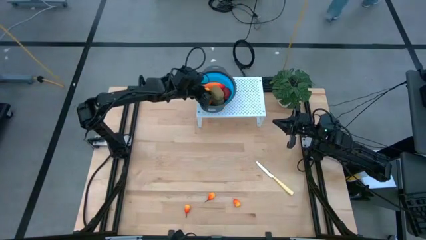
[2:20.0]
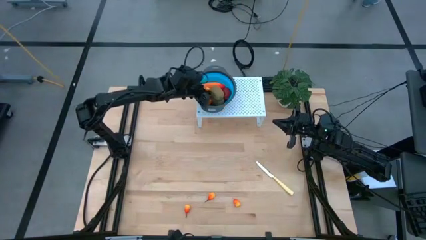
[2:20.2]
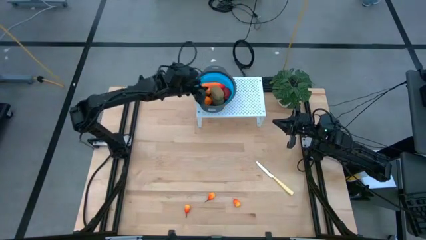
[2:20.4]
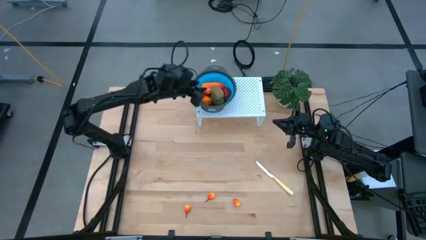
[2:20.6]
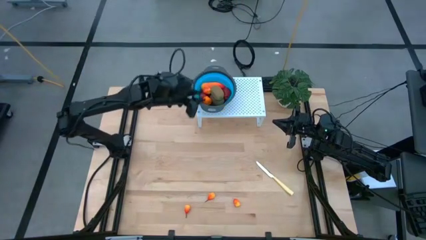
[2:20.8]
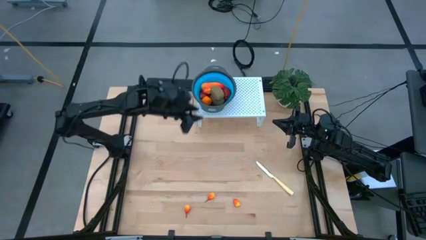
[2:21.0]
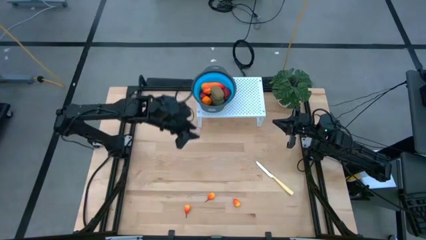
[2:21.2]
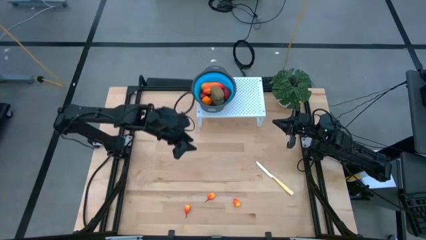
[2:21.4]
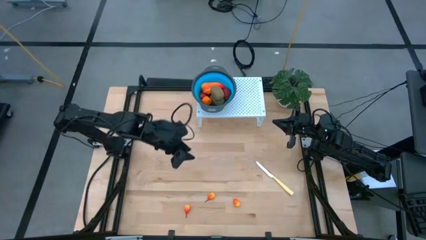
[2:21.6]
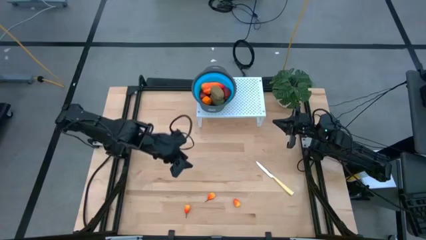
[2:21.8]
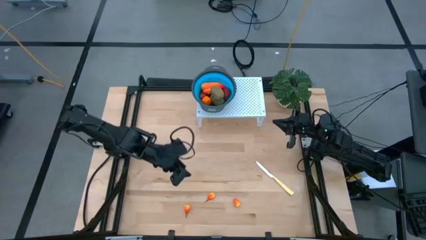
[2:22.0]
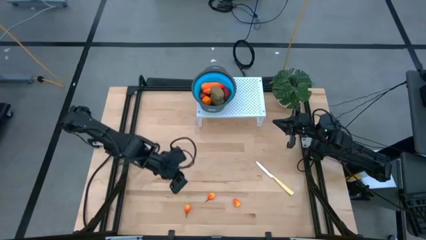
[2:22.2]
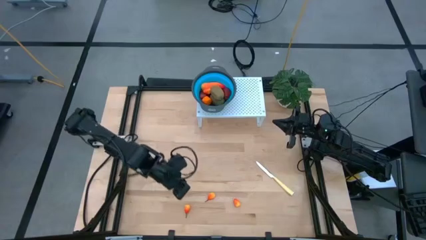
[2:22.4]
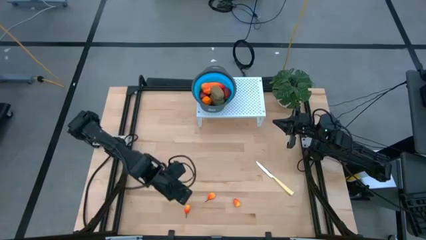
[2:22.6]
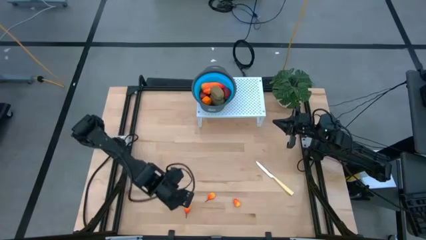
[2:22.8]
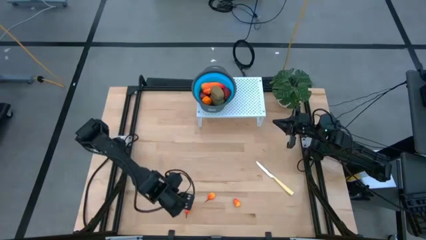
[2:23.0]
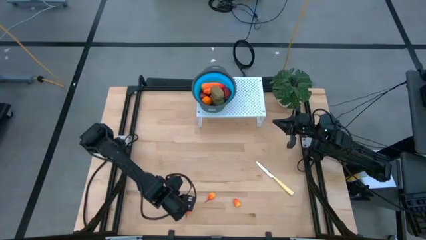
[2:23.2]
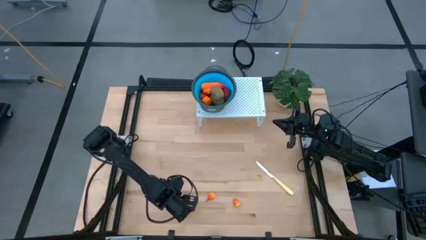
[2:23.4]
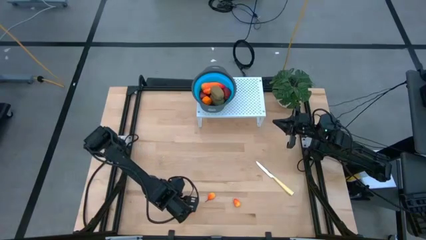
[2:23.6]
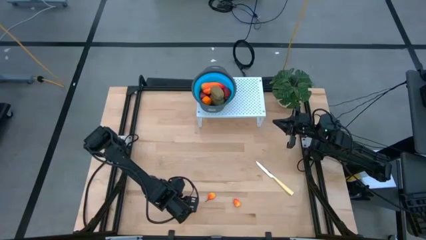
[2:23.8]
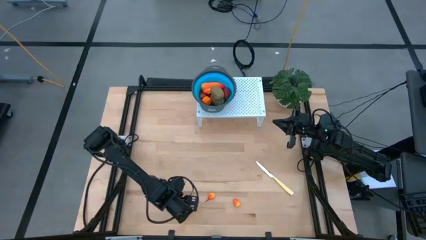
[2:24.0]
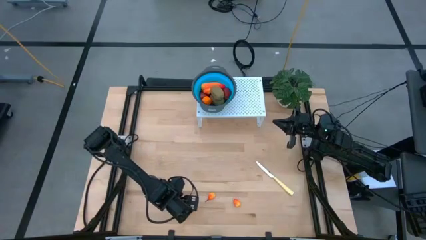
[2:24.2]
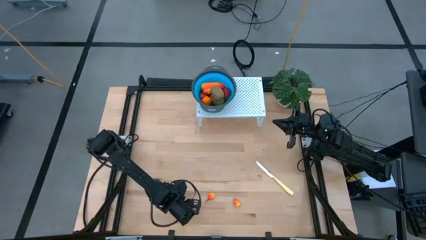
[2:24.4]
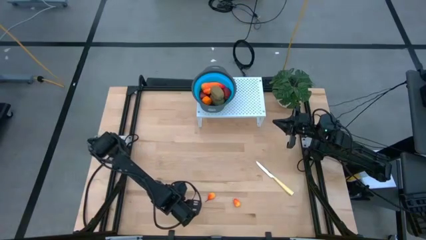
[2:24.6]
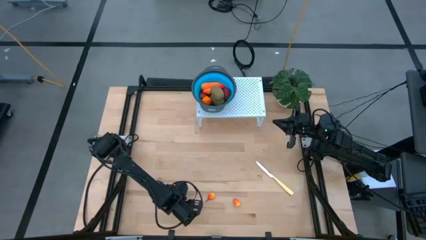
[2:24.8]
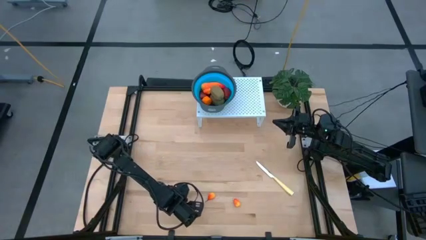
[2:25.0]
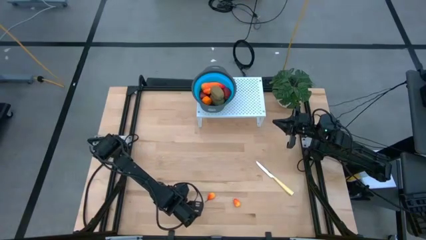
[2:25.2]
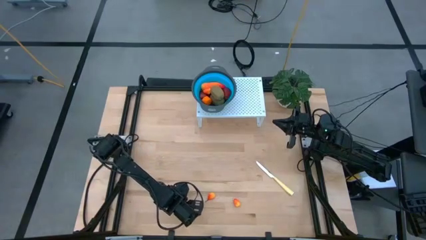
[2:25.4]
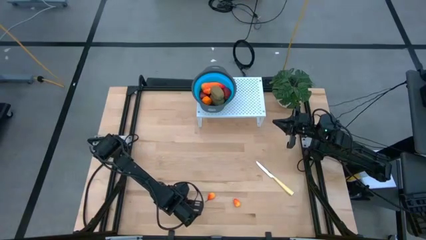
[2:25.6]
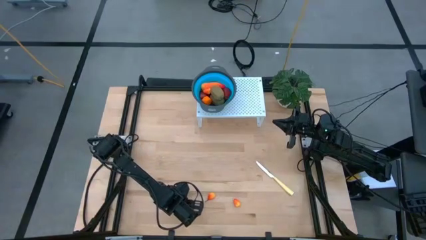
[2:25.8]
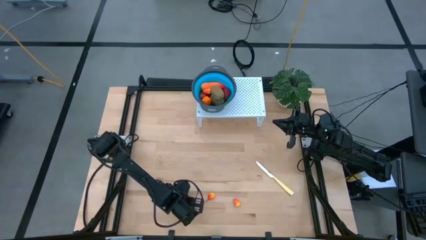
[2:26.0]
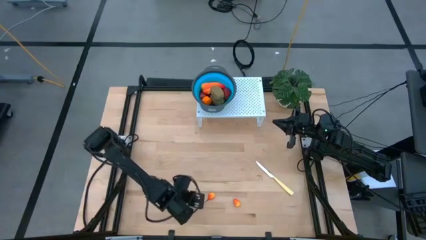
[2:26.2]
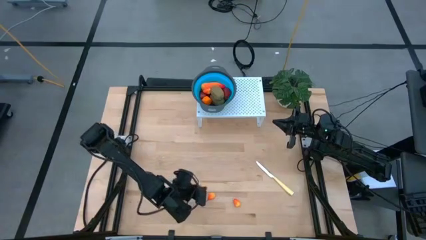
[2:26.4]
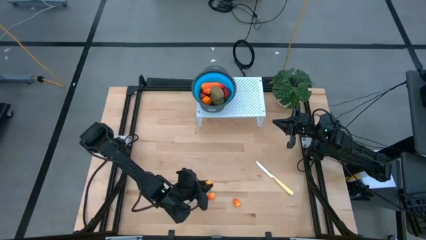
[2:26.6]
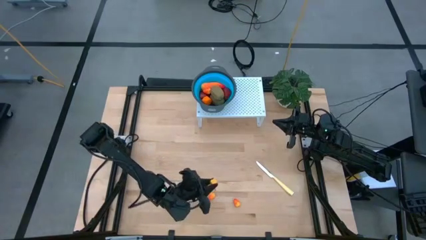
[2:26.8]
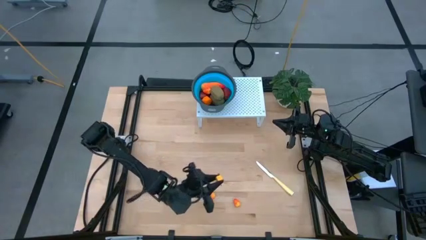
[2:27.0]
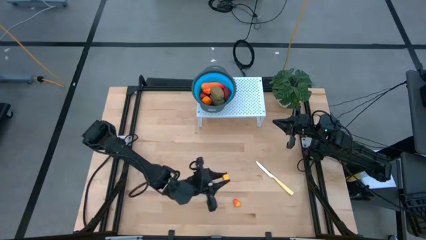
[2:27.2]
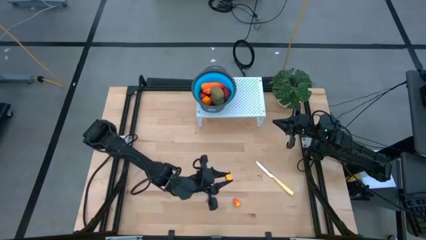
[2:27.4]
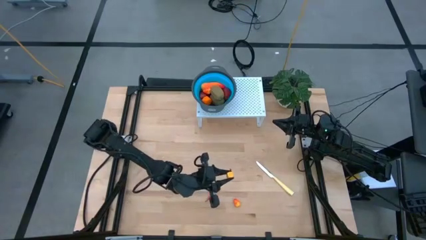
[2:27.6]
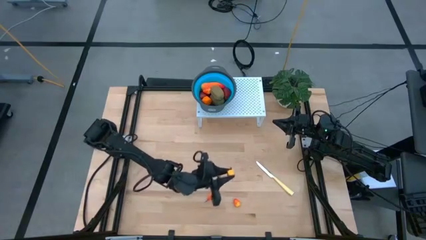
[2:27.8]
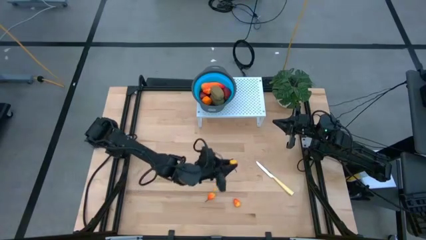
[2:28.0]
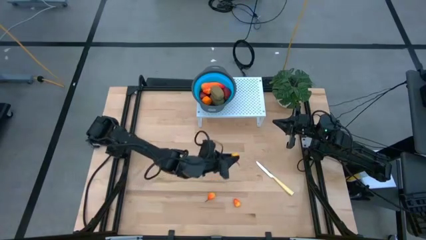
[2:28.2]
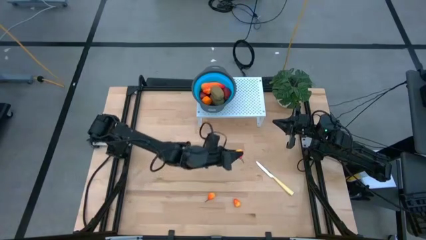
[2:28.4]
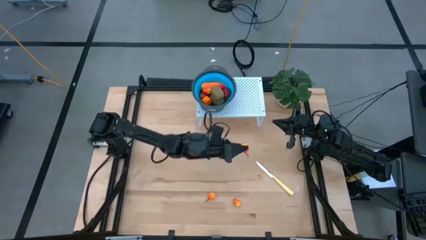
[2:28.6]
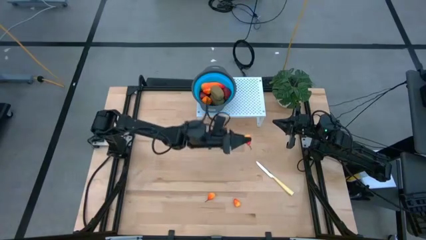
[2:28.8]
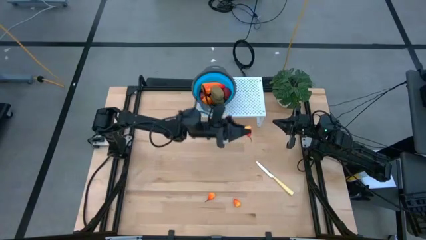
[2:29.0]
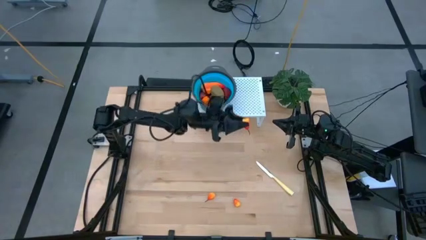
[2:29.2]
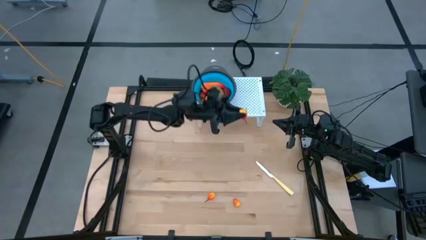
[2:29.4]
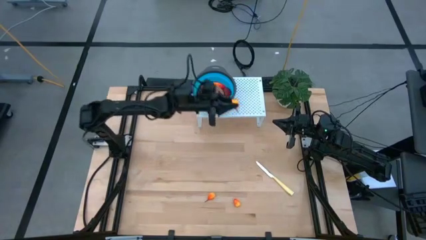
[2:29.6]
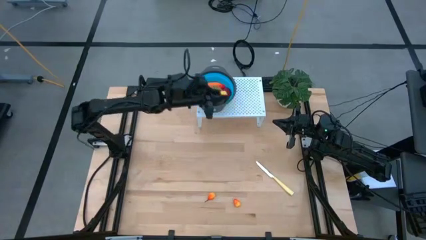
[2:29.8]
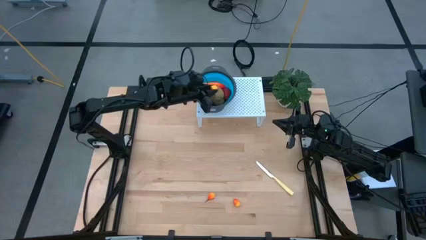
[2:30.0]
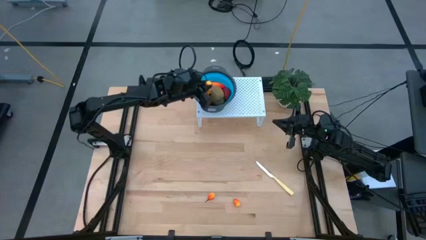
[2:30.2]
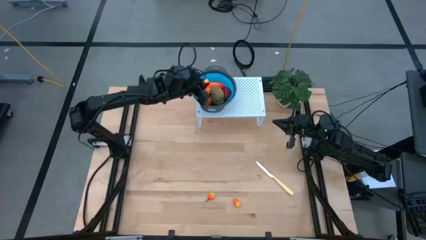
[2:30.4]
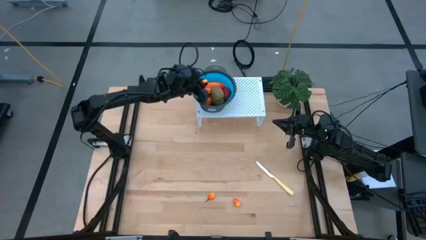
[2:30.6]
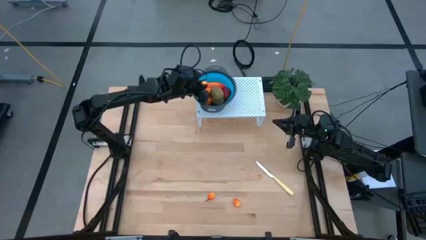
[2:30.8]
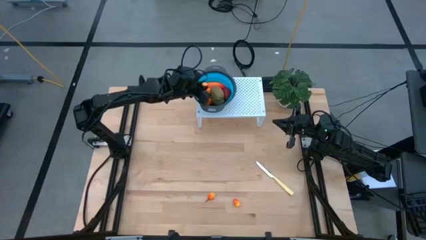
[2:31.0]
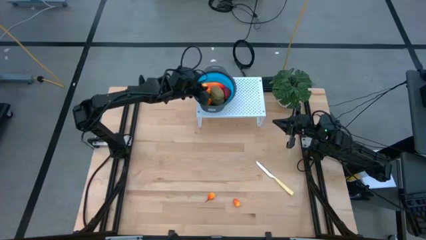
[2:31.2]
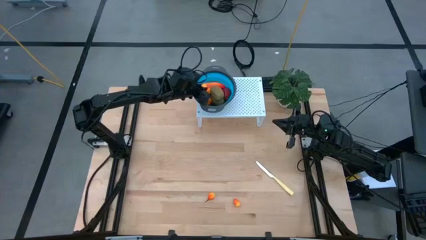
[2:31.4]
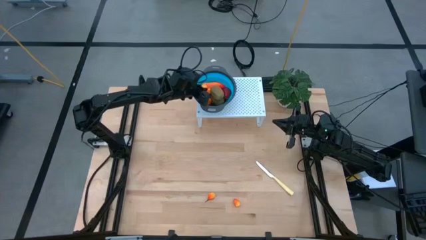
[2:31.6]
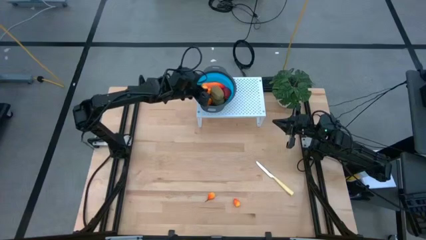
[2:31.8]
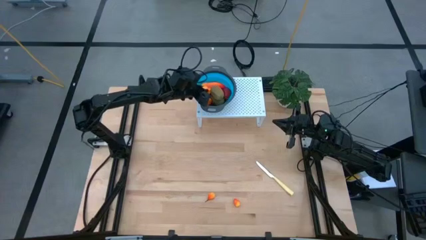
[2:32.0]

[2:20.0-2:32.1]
Task: Pick & Place Fruit
Put the peach into the blue strainer bowl on the shelf

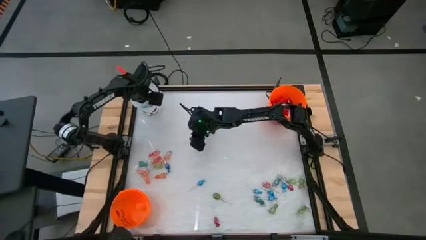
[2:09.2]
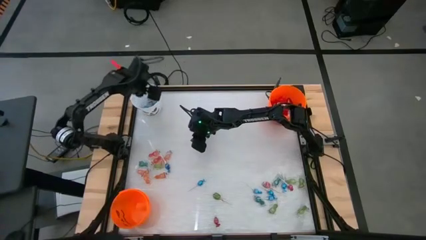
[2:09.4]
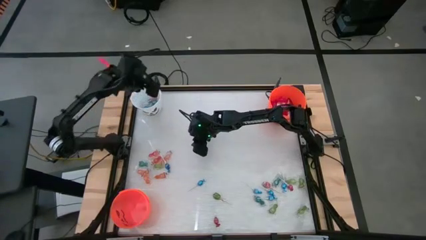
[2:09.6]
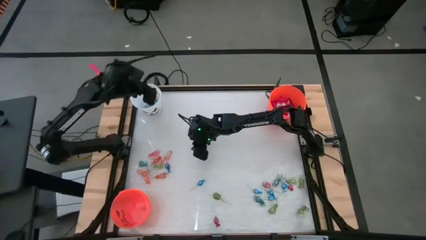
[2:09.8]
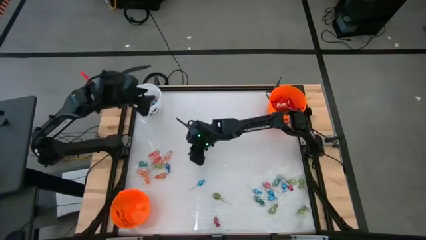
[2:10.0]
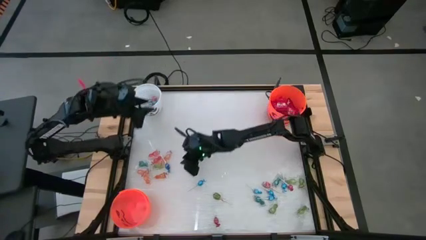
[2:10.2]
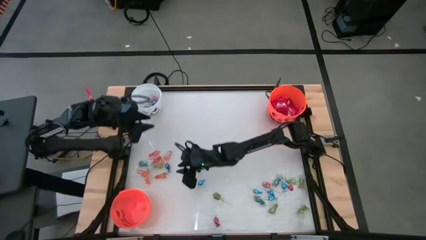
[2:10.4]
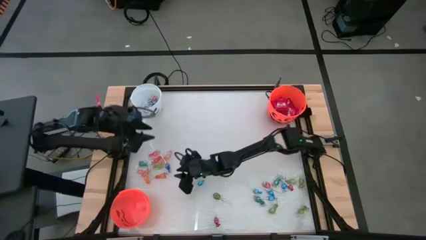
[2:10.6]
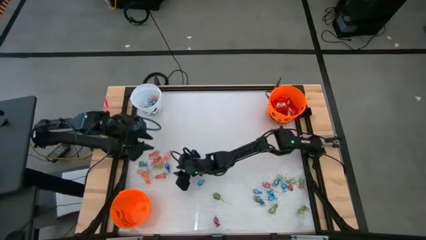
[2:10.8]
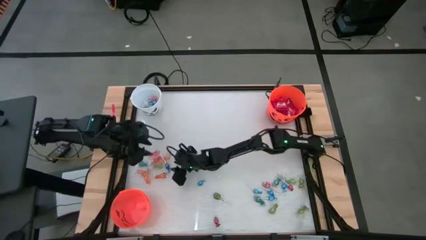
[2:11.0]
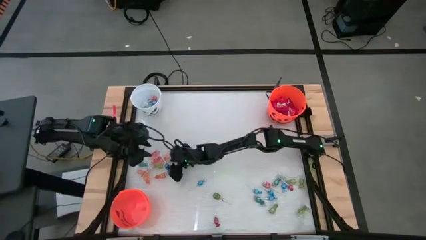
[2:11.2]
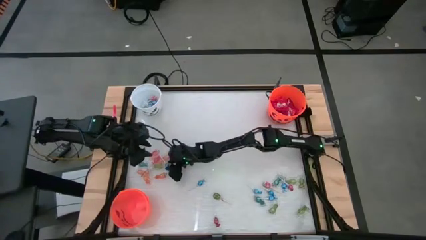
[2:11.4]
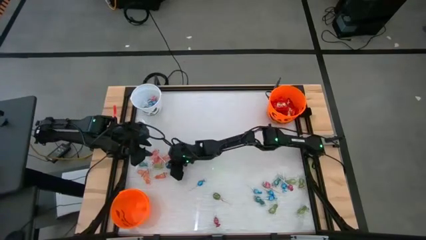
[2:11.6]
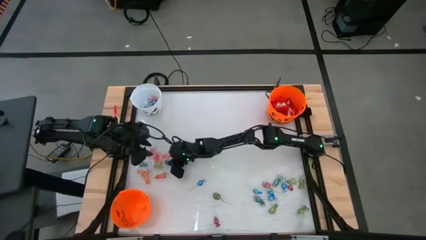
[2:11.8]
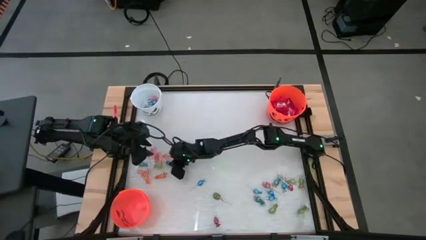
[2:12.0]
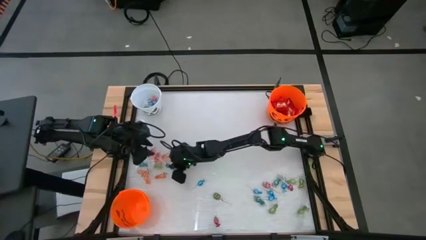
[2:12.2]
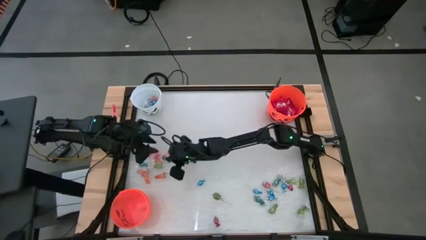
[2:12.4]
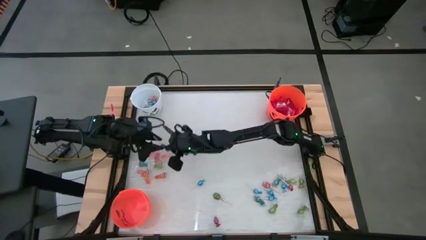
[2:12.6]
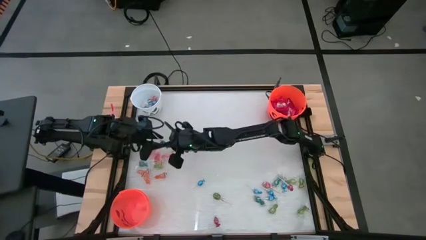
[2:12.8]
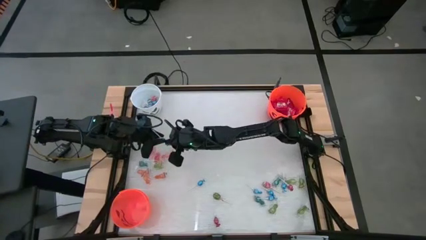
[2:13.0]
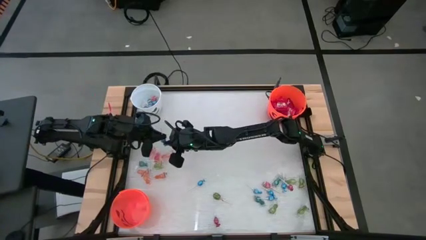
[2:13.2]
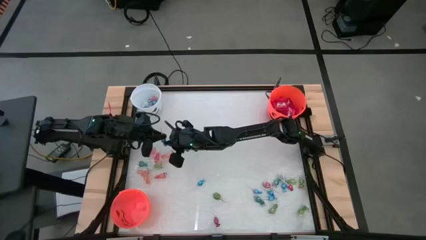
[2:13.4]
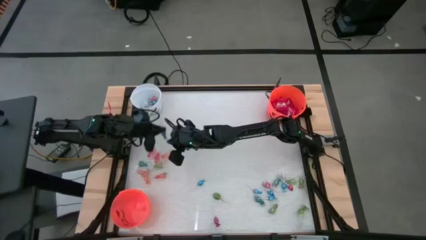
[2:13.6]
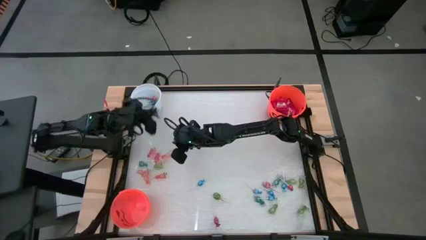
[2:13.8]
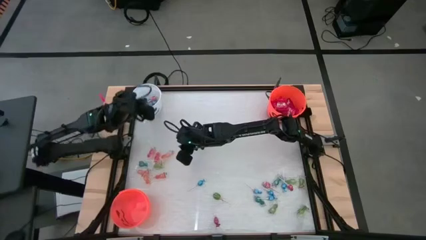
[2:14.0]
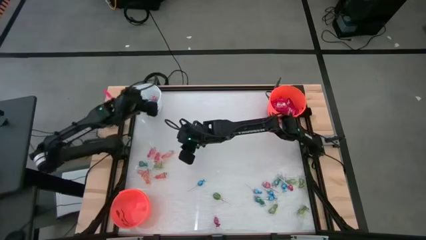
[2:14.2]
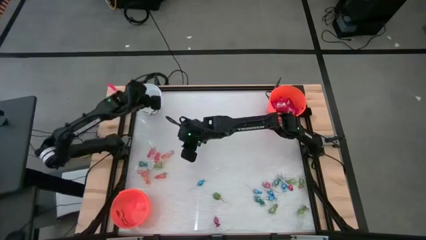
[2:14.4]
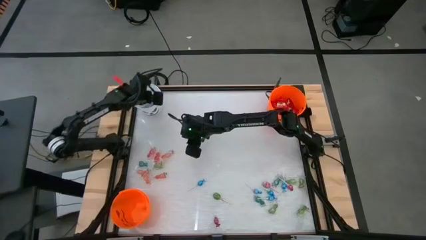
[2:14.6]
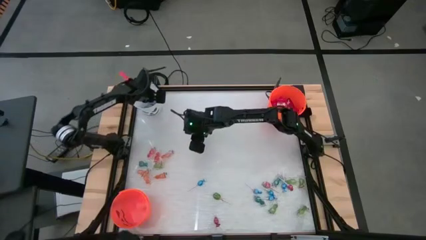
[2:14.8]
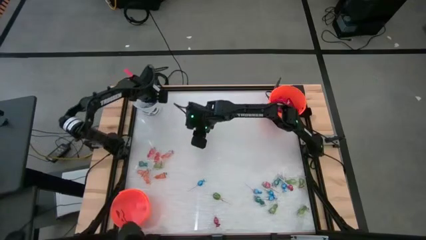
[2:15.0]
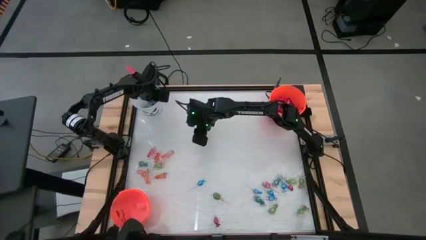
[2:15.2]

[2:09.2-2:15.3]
Task: Sort candy by brand, put in halloween buckets
Put the blue lollipop into the white bucket
